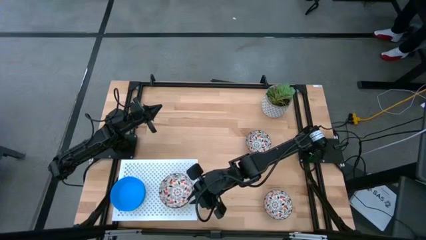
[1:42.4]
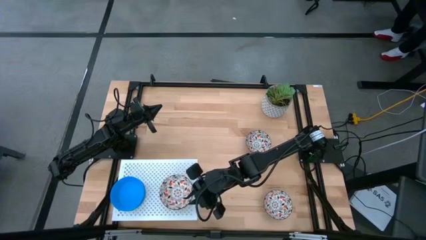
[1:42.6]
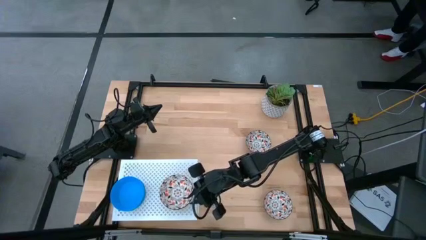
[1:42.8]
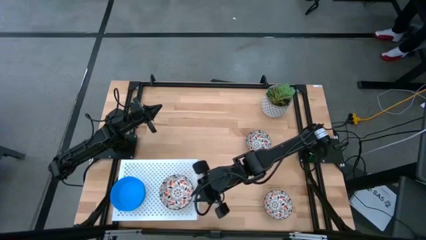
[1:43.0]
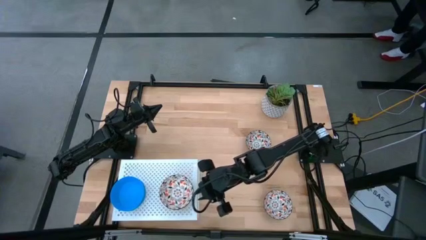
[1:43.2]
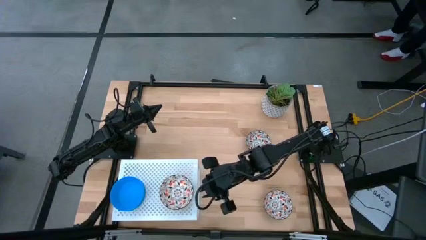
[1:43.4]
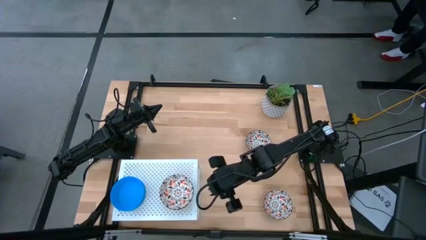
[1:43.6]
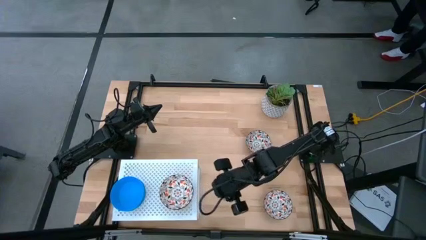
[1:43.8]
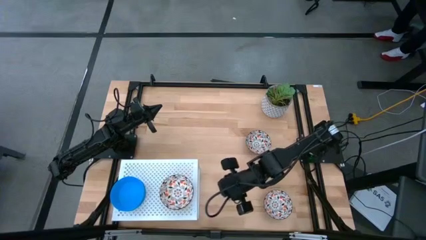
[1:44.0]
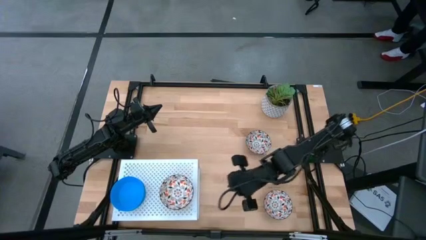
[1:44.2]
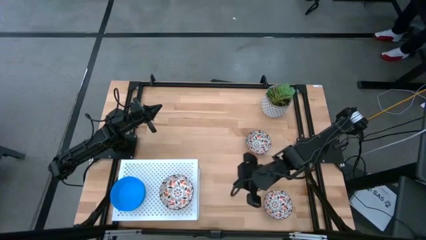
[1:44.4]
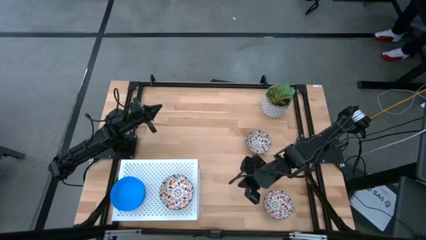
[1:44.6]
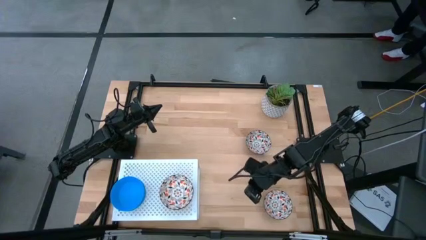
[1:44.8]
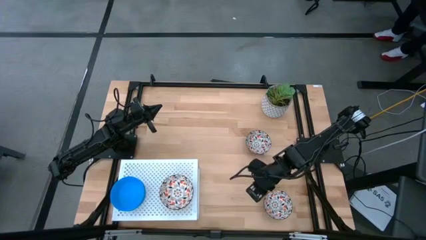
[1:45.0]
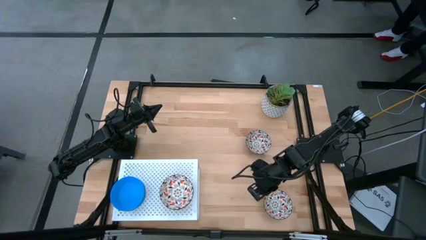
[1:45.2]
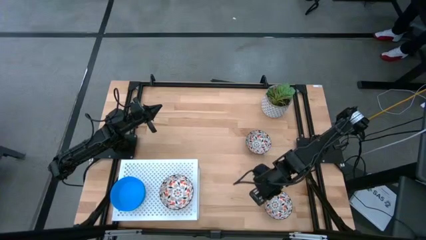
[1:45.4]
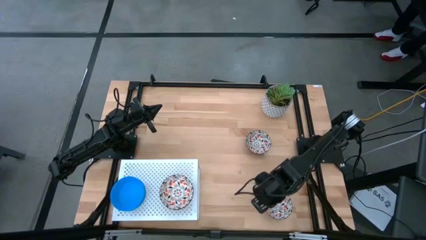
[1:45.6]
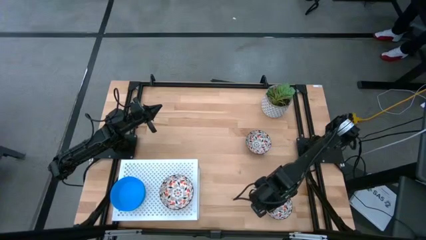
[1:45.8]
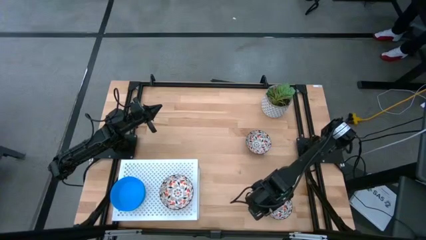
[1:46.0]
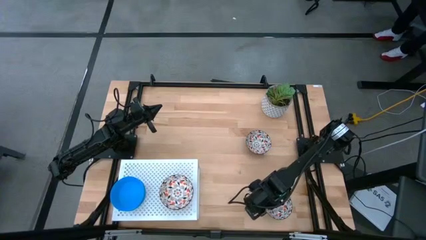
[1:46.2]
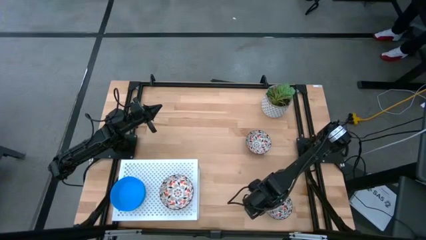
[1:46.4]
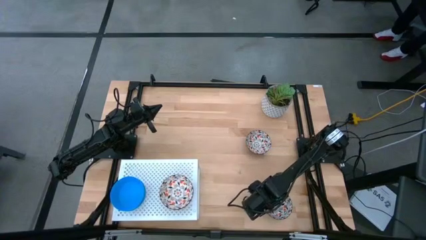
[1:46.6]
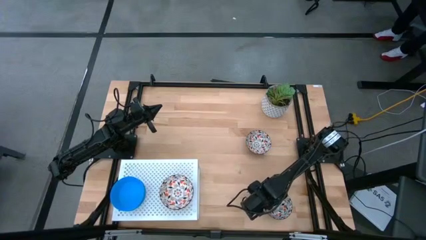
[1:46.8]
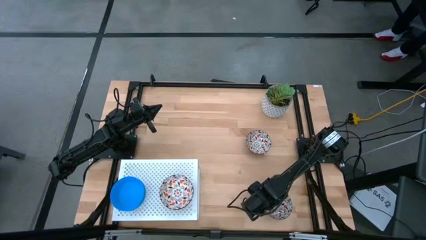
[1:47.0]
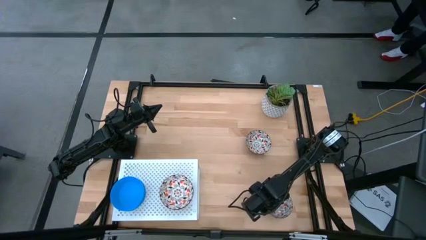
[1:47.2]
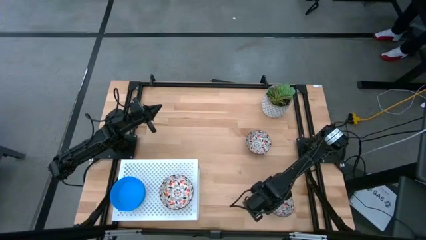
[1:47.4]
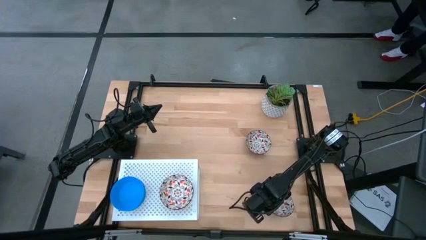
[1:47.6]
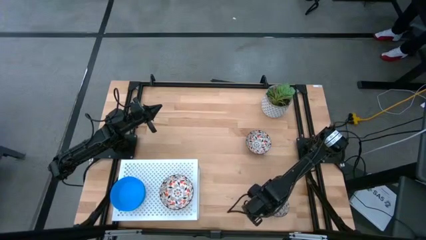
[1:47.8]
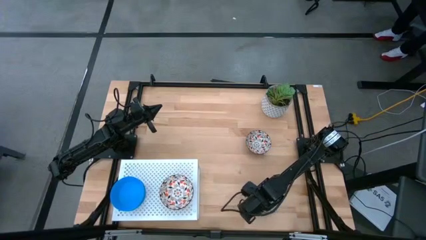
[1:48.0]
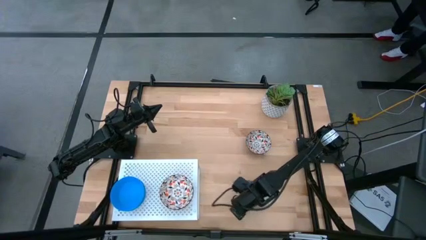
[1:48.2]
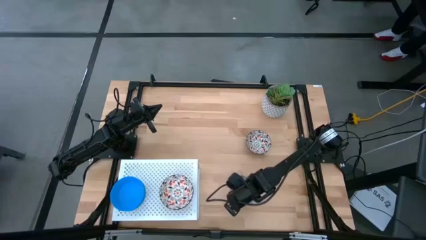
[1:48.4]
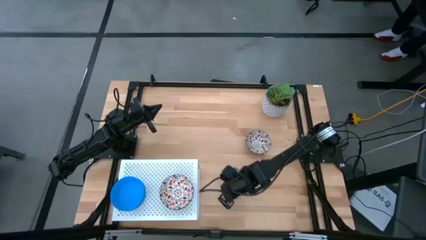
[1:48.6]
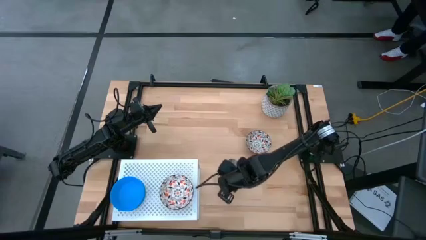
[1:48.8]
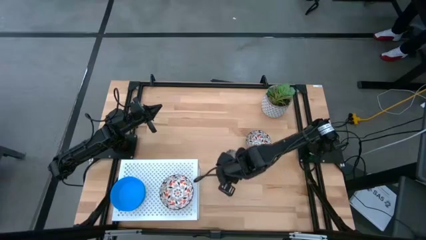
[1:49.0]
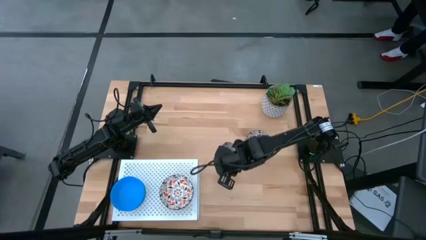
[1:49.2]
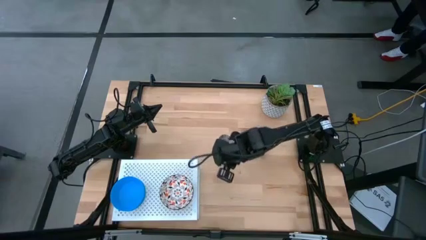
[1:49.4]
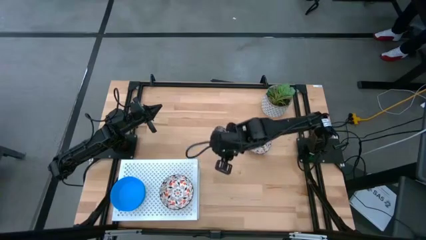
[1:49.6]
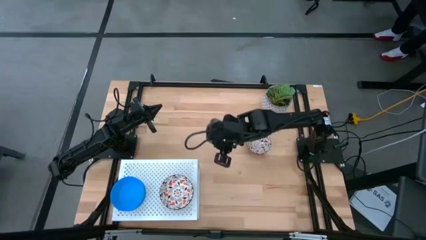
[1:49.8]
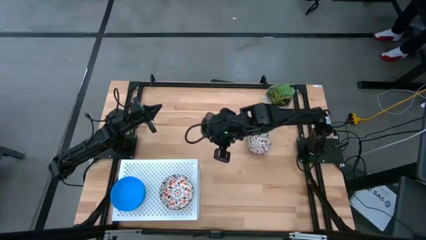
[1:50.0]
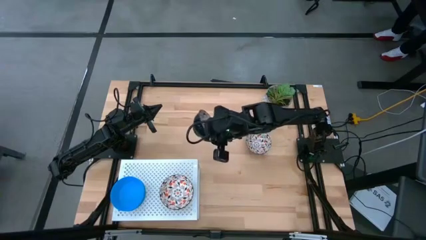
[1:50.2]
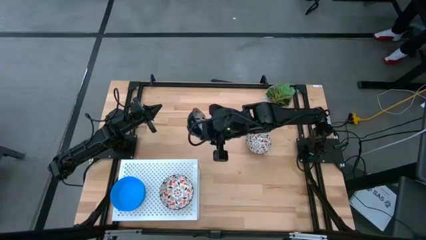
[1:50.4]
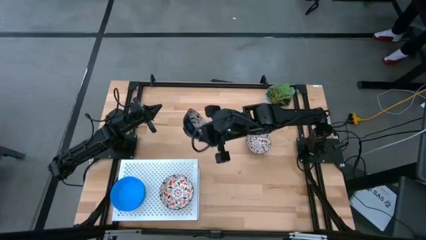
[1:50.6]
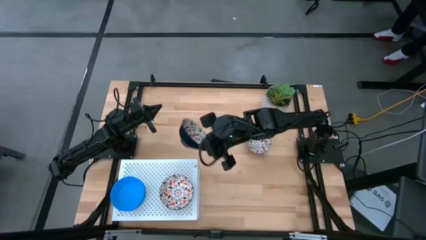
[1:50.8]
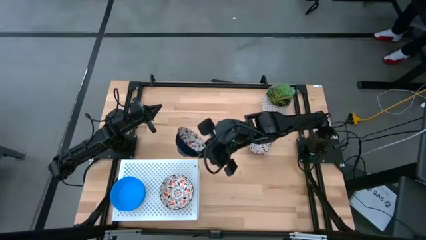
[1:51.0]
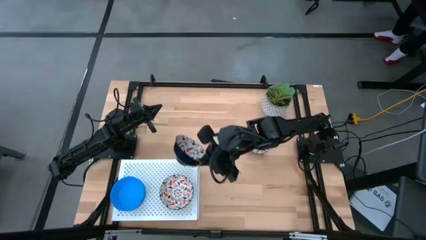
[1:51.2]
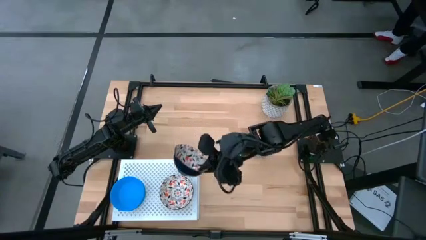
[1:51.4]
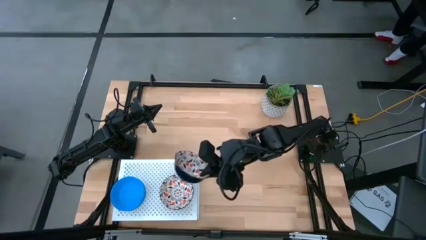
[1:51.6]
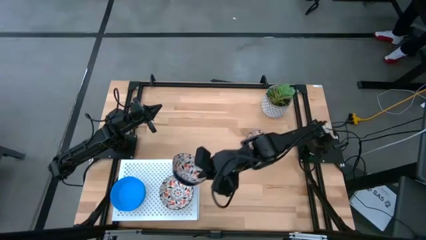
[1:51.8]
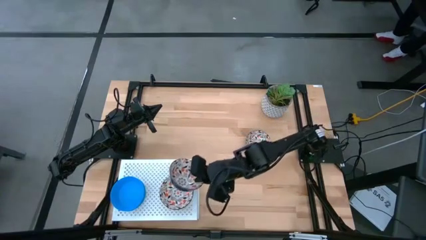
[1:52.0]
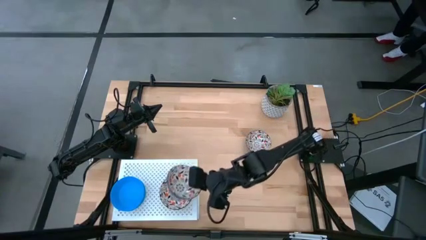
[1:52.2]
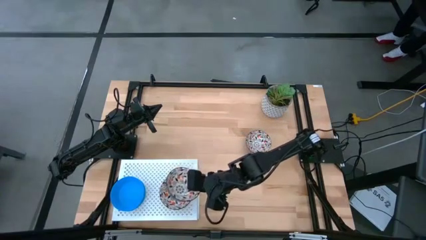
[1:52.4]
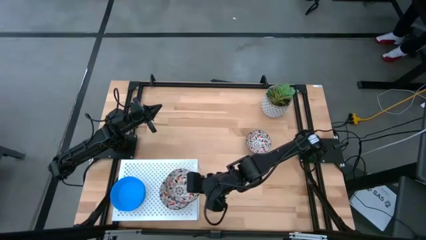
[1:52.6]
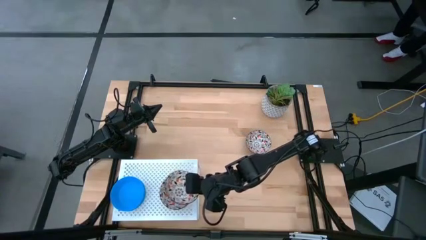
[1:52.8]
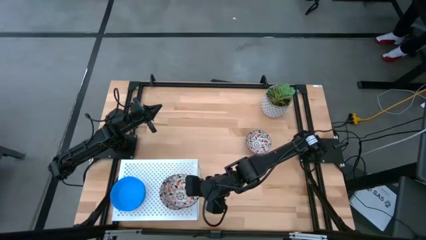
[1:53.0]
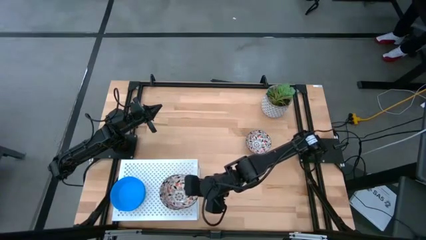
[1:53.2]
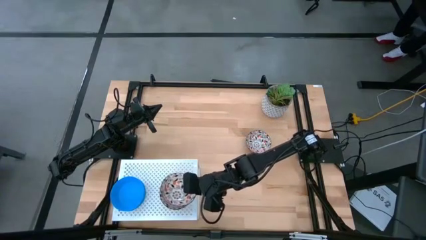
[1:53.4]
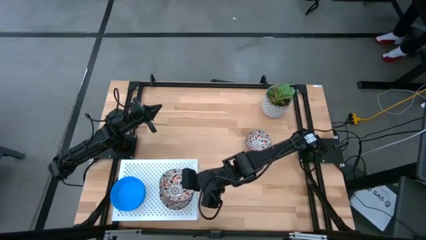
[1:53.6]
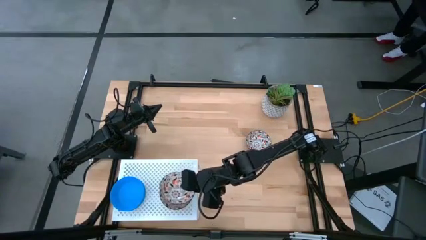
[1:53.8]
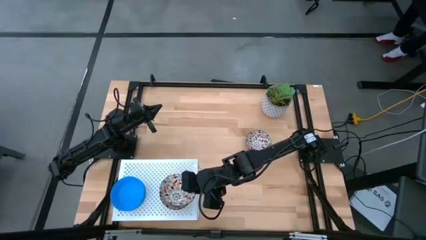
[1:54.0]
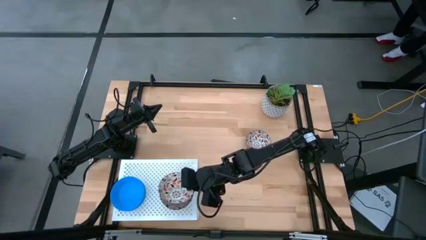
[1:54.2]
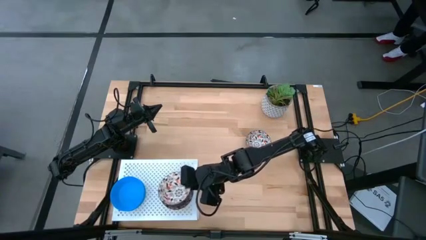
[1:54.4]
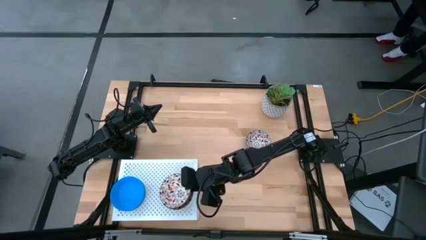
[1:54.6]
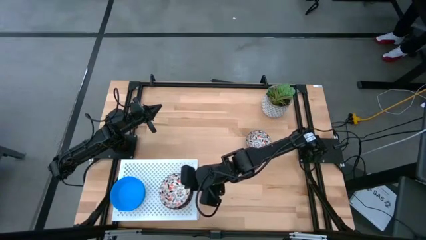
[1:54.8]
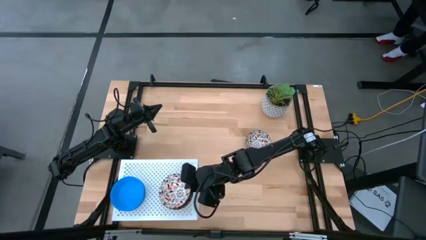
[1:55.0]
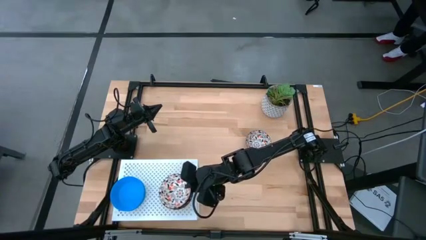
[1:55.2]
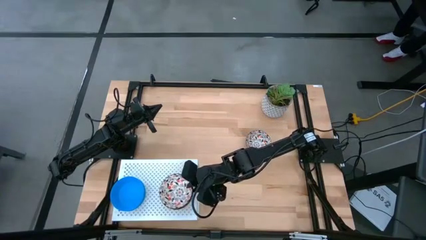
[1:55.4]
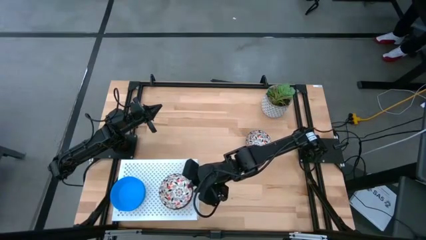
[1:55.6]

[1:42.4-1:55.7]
Task: Pick & Place Mini bowls
Stack the patterned bowl on the stacked patterned bowls on the shelf

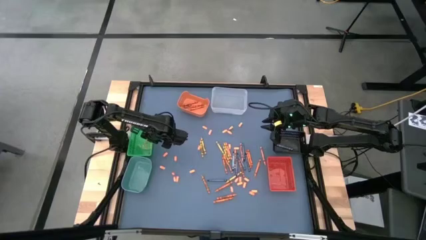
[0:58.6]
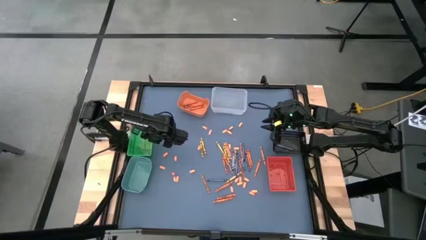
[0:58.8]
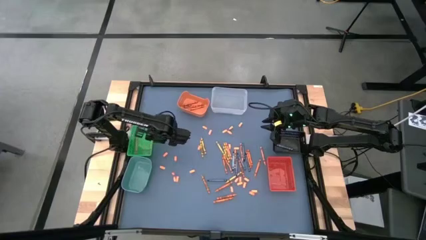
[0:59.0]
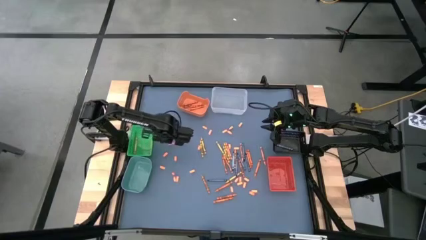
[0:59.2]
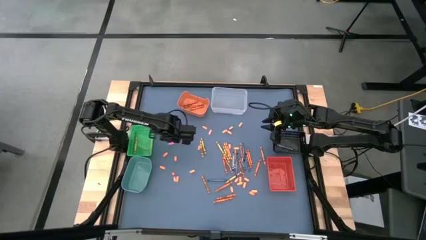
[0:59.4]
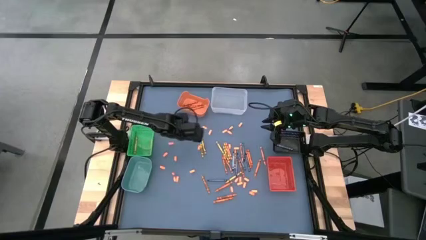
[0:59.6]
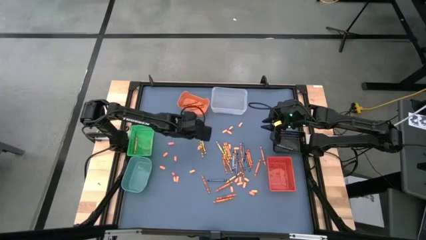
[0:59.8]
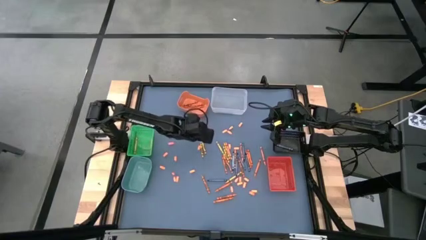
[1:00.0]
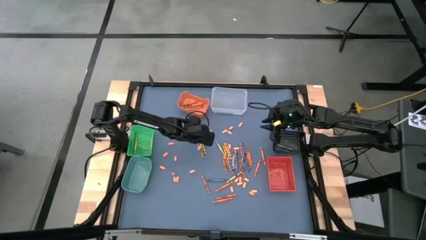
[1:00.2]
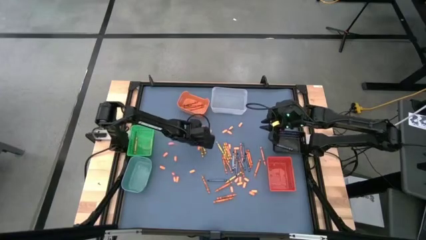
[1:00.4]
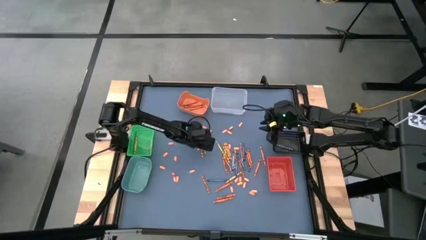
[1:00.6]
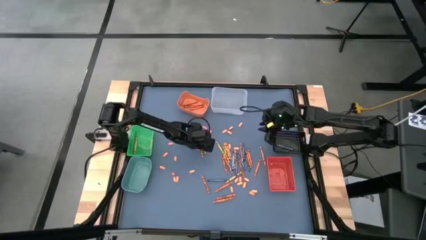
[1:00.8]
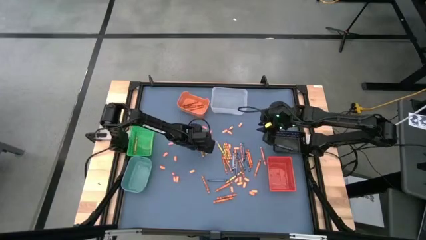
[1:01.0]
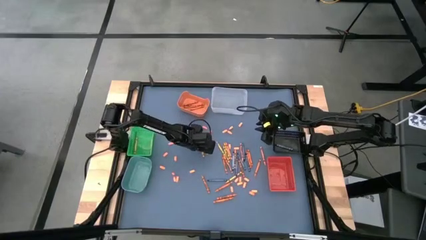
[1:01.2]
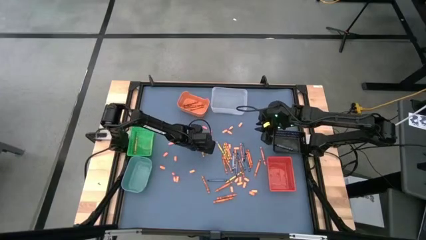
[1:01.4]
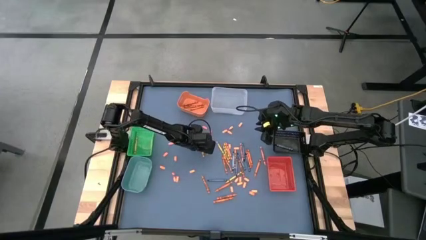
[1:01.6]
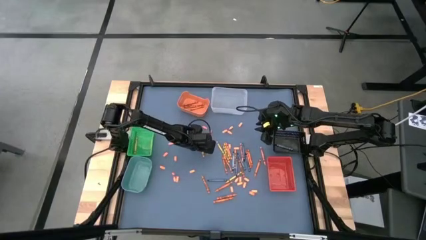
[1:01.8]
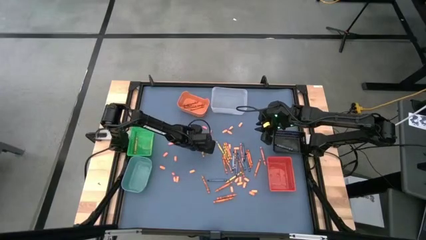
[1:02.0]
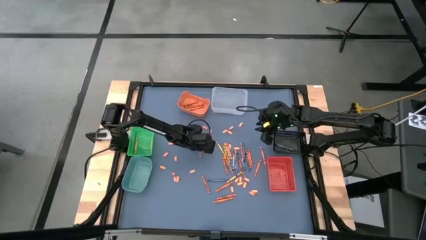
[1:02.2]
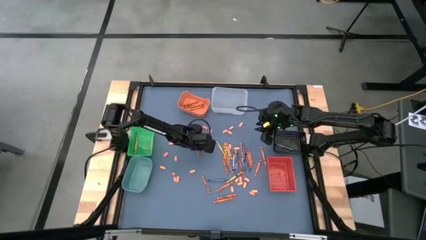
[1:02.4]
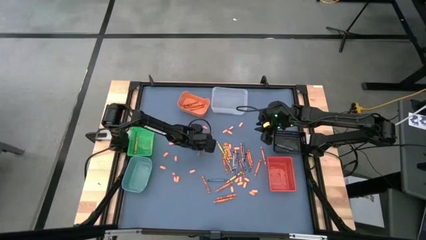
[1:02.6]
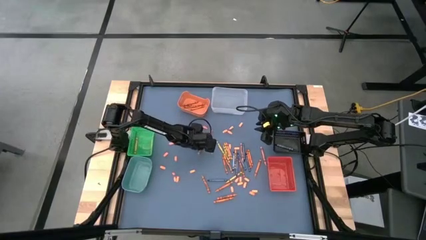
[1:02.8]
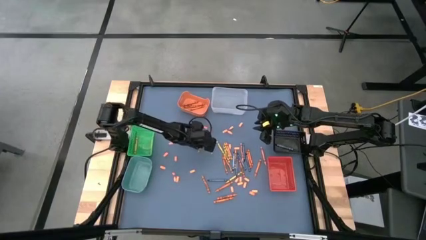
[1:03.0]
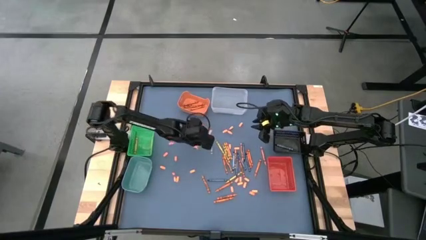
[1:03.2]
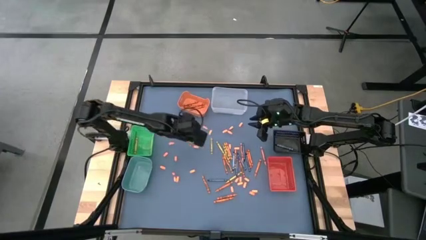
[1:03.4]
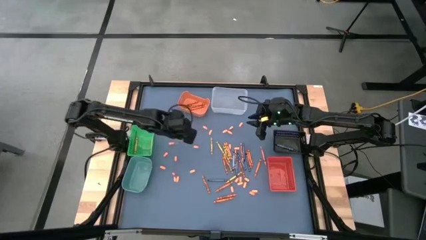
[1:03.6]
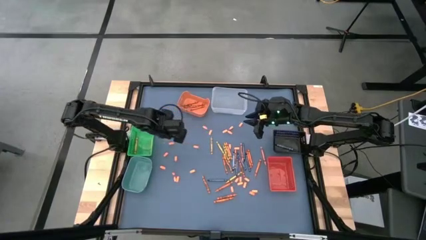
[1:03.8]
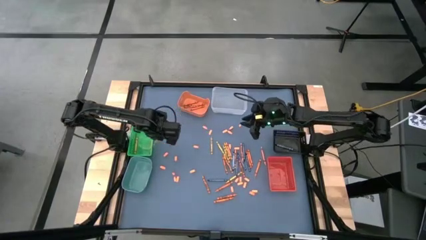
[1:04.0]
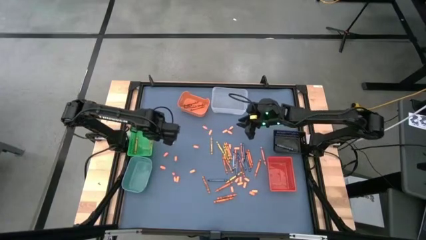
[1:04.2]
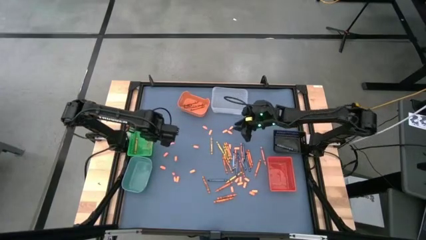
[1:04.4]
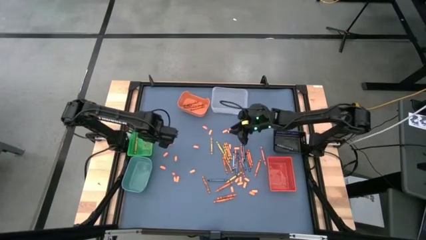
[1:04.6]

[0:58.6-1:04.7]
Task: Sort crayons
Put the yellow crayon into the green bin
